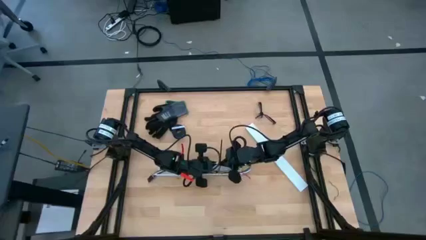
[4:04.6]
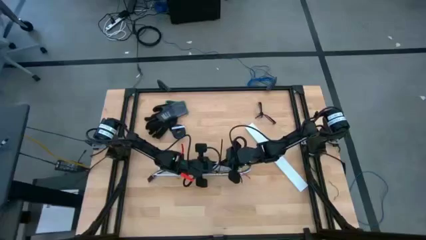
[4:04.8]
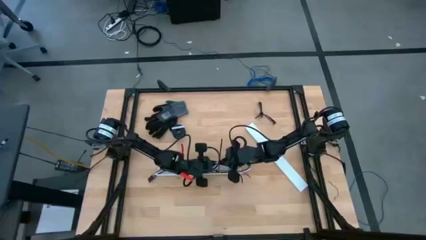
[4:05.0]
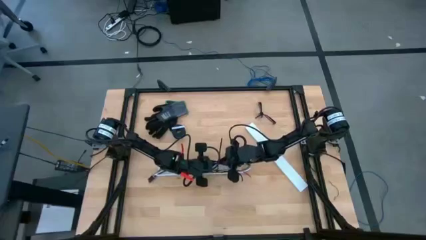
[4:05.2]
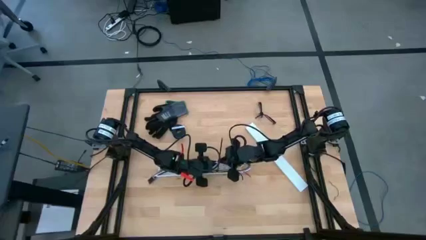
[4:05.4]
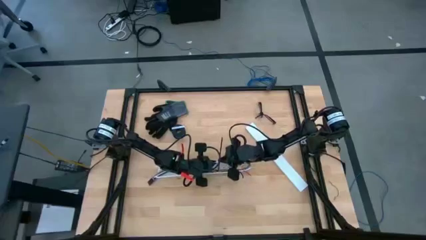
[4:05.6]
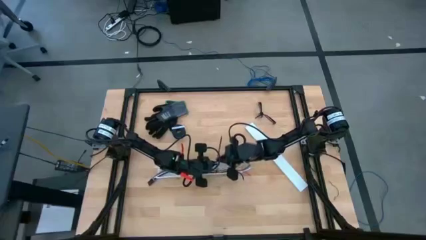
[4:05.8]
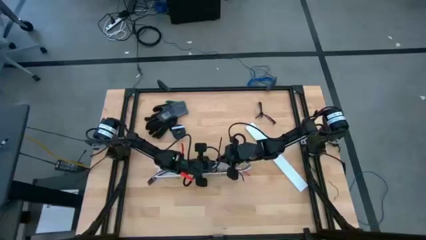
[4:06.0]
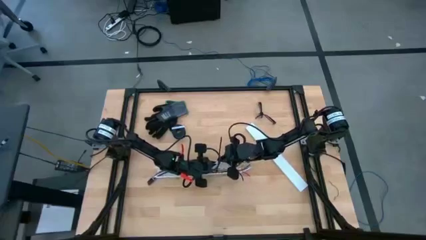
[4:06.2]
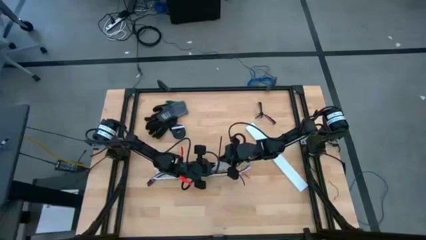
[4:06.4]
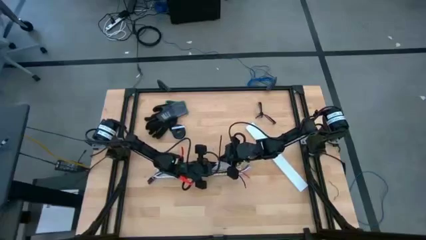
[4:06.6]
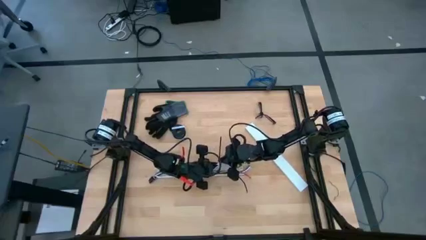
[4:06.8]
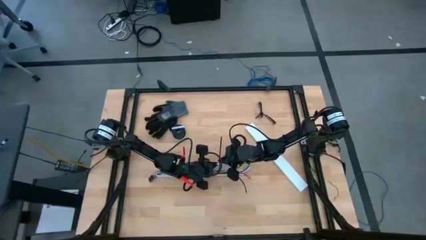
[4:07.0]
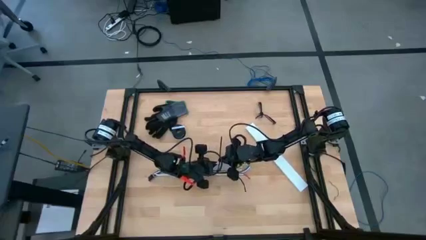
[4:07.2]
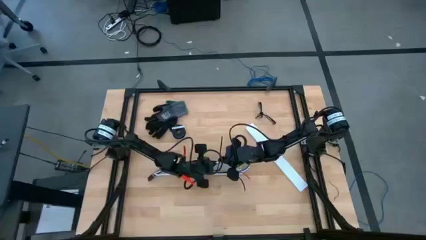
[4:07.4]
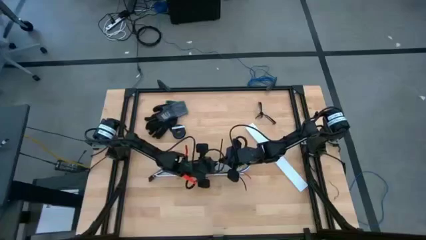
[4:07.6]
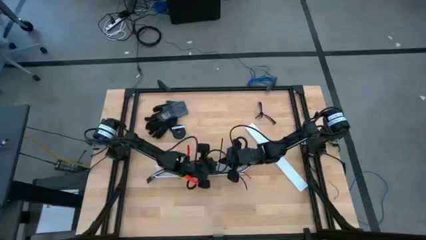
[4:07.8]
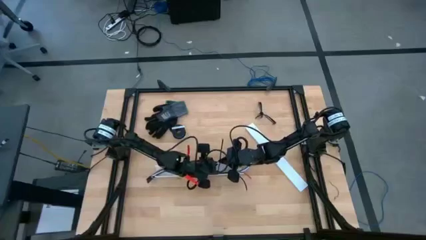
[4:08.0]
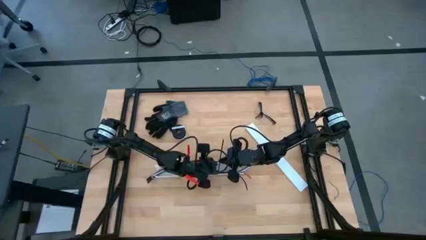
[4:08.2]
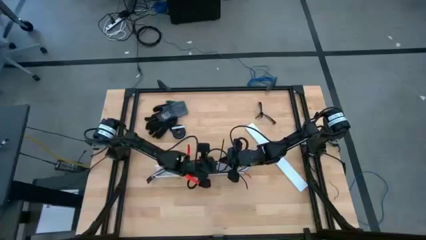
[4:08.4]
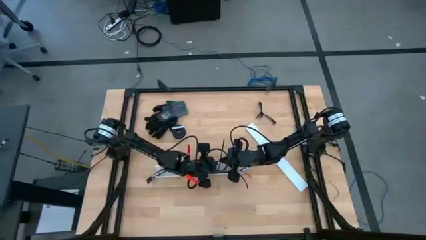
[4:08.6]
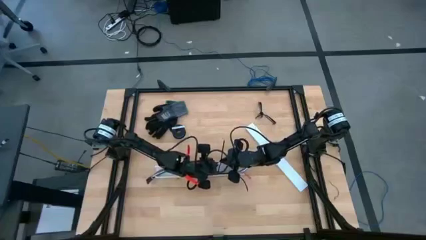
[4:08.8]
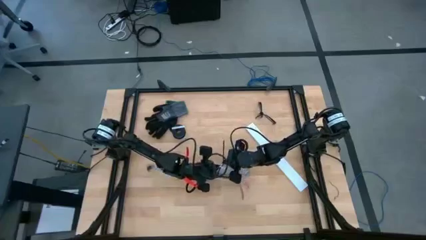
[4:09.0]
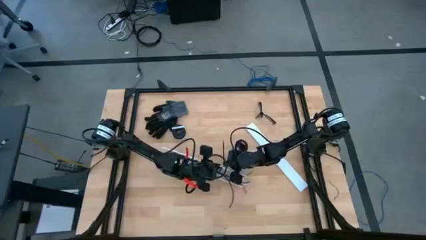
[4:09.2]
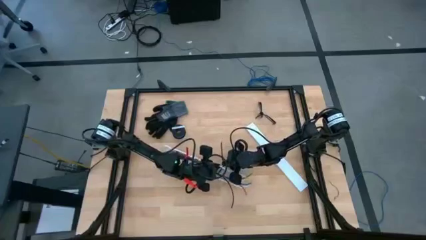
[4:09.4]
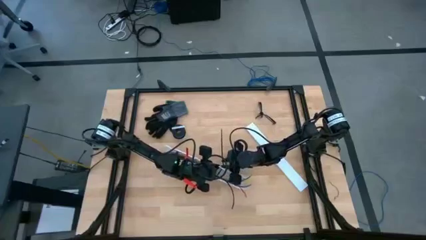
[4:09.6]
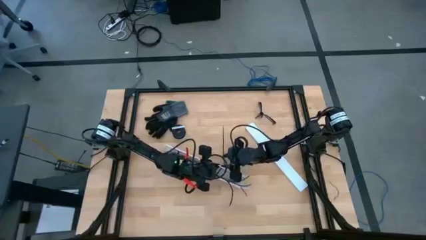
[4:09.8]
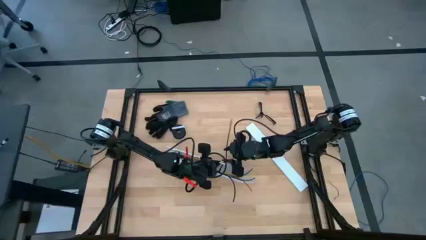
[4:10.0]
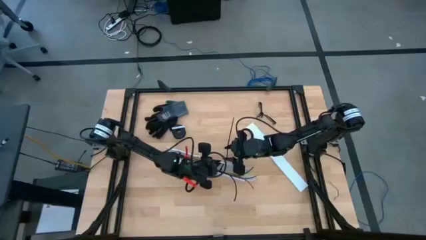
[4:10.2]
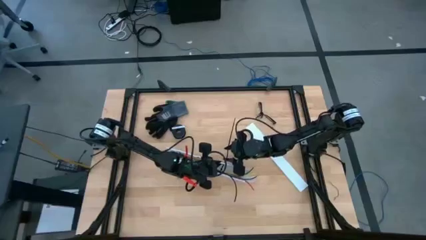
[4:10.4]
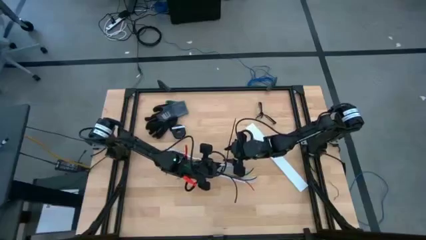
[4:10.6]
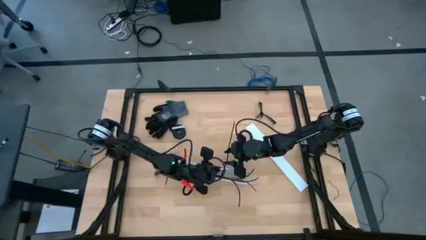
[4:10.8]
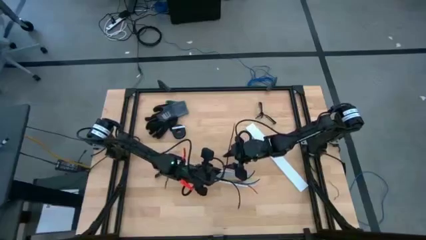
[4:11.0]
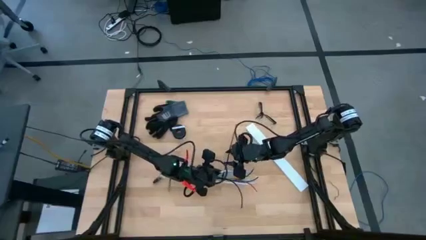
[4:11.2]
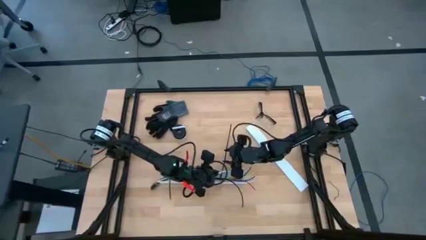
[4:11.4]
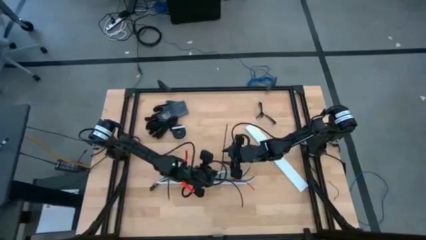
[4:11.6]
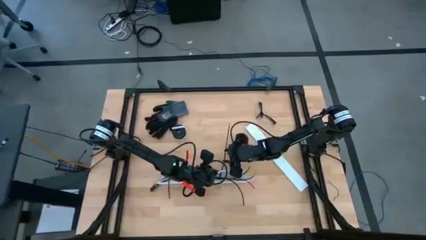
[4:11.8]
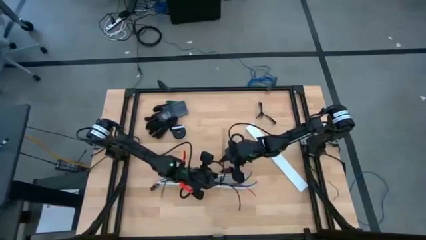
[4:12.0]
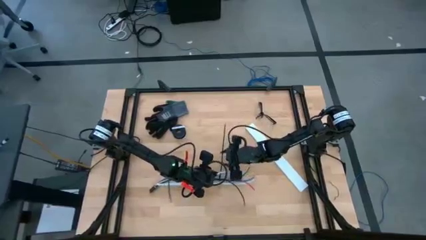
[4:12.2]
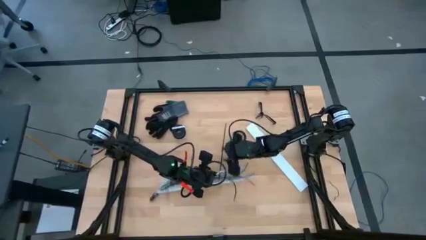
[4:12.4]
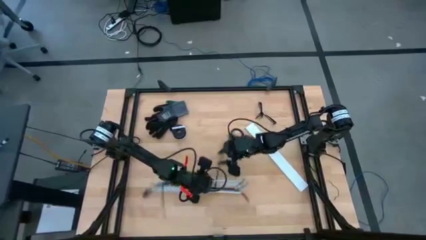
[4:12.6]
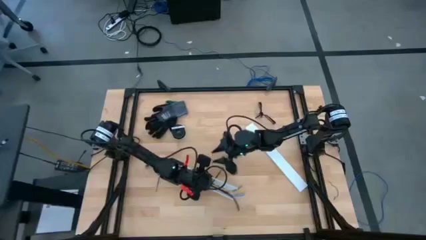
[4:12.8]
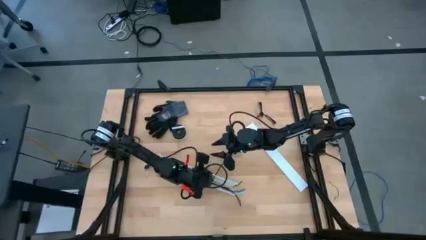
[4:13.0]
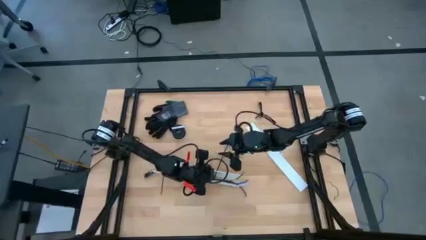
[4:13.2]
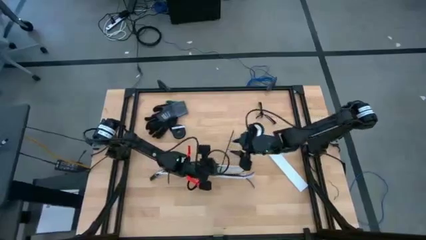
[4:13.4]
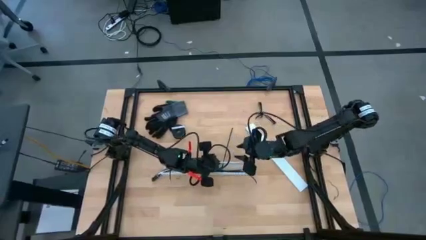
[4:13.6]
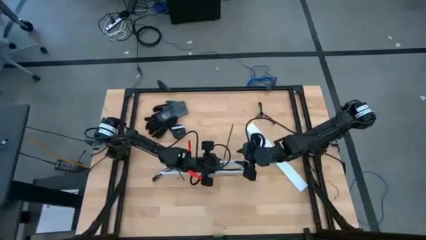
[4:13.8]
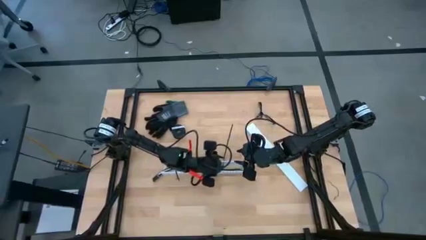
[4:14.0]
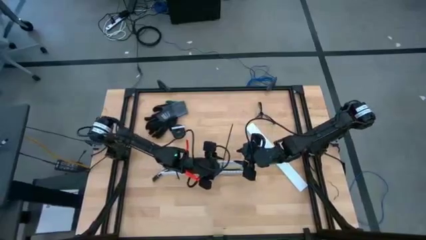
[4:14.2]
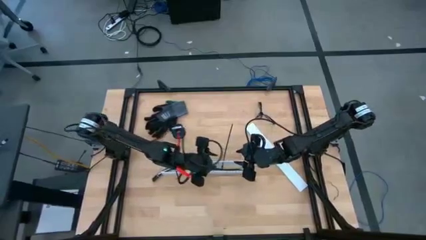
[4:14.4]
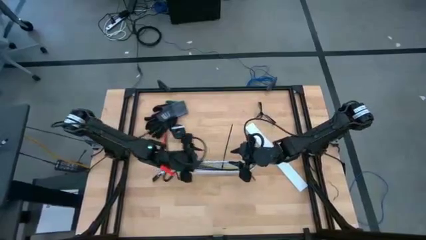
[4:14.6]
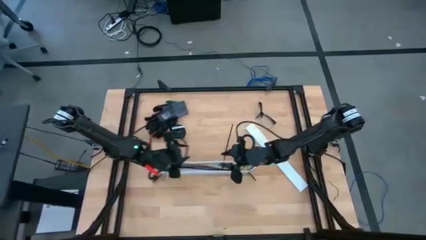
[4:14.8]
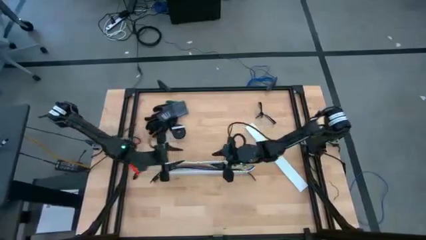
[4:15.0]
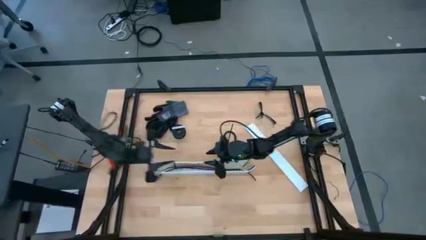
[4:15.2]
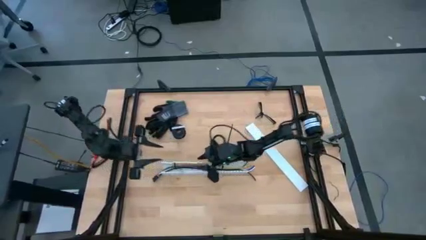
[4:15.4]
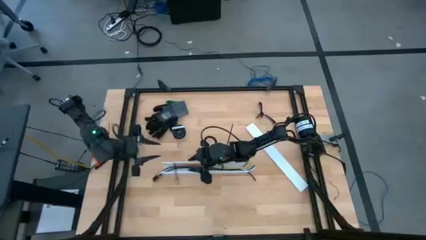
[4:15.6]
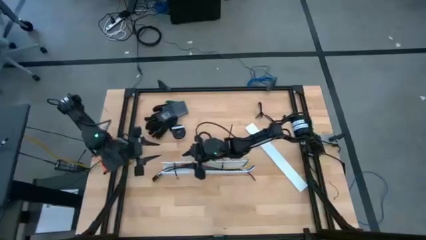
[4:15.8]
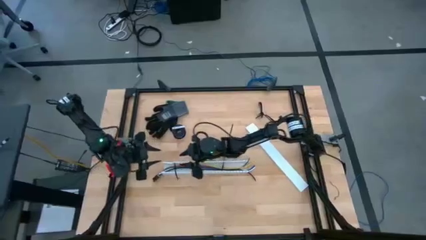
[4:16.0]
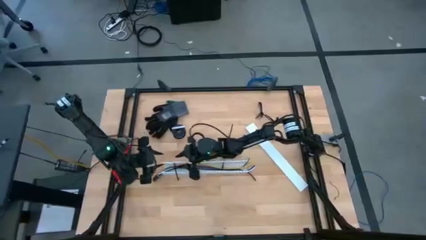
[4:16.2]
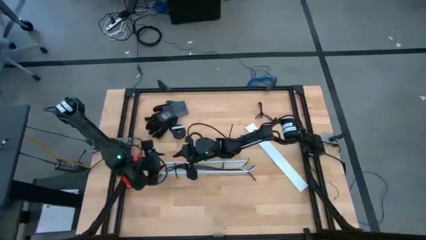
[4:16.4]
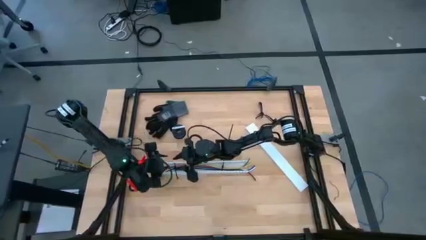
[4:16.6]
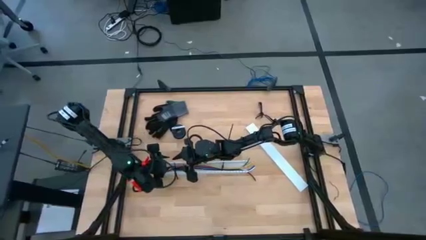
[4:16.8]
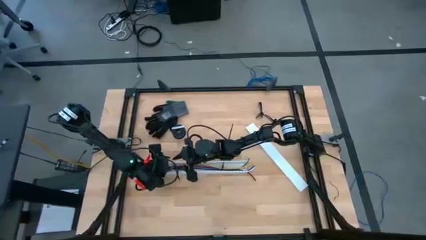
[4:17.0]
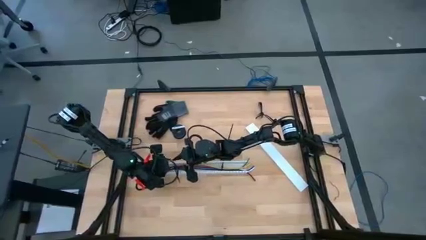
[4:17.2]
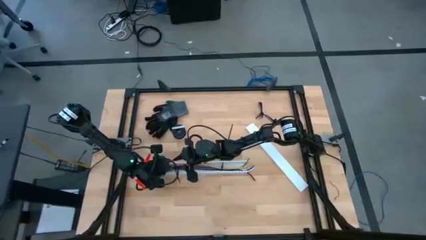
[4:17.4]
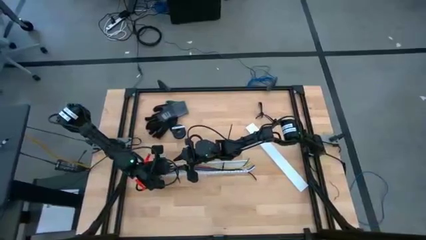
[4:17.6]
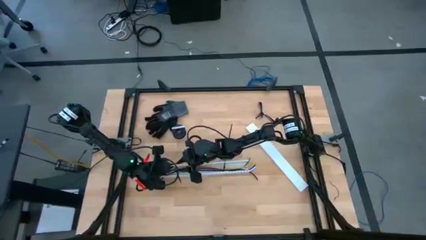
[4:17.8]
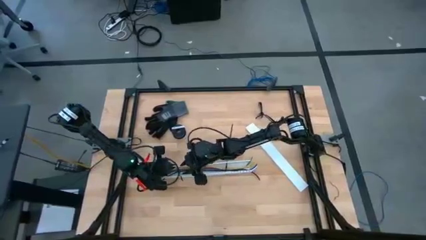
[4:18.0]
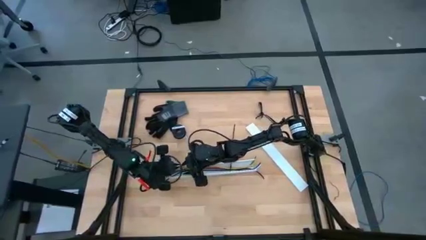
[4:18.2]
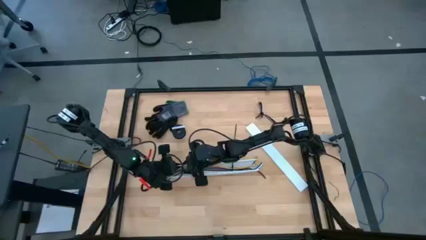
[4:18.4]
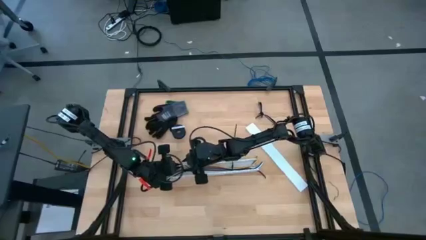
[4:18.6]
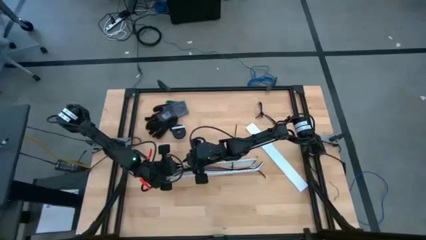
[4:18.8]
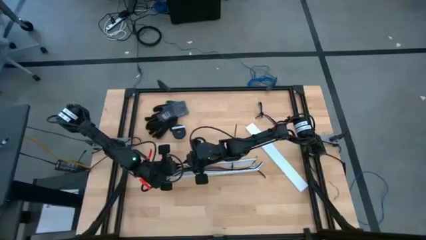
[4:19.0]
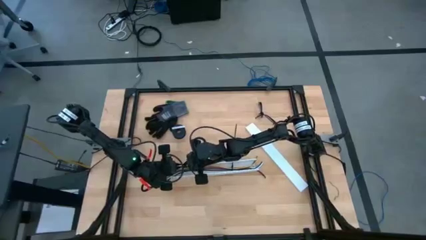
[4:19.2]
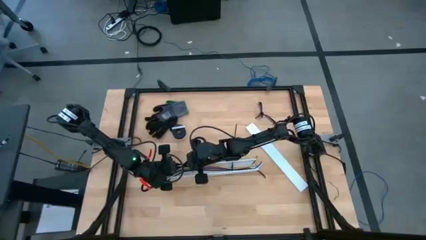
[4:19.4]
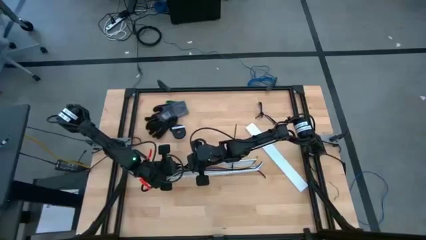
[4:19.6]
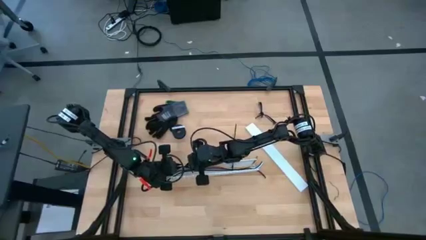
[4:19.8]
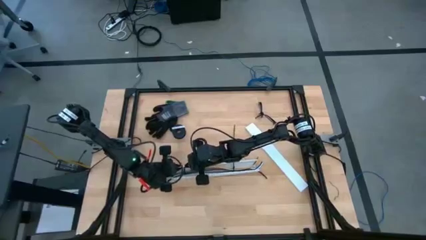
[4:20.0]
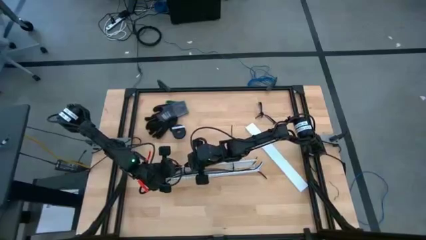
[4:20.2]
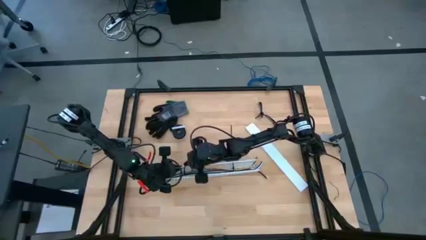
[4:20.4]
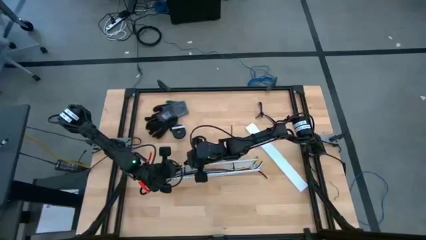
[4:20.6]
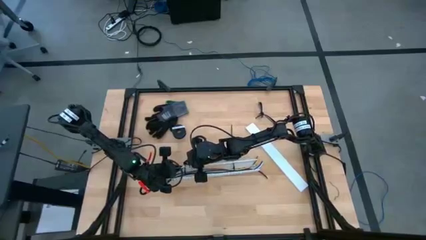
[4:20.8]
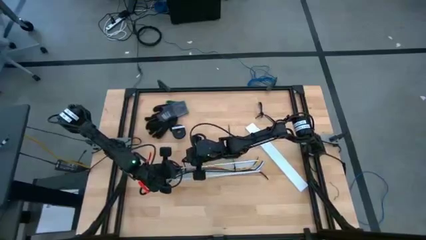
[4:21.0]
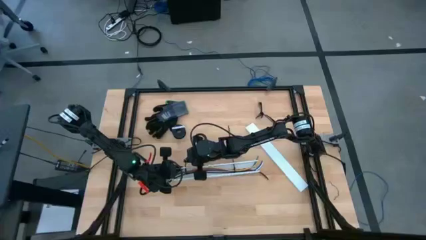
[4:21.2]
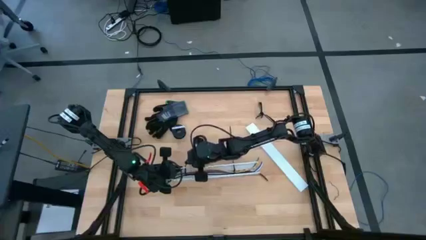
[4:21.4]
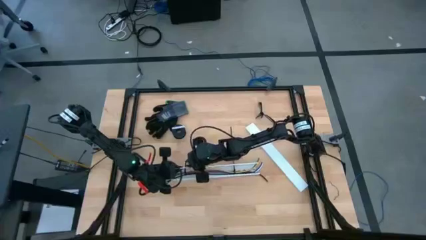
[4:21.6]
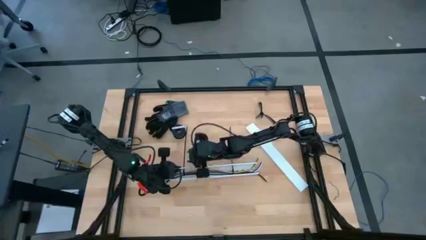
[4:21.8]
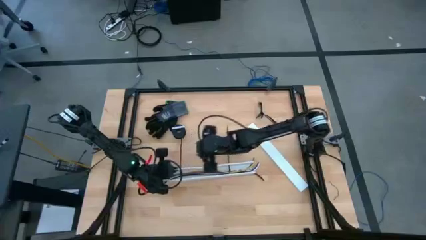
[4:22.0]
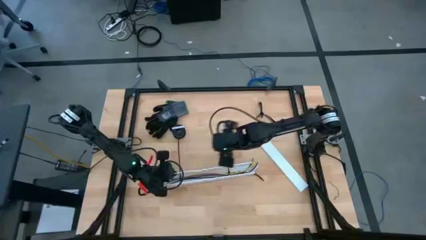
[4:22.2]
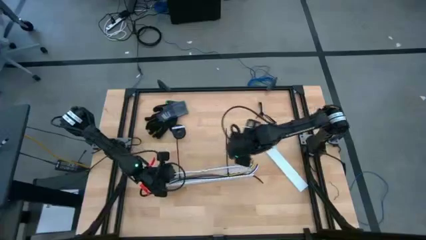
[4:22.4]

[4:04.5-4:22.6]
Task: Ziptie cables
Put the zip tied cable wires into the white cable duct
